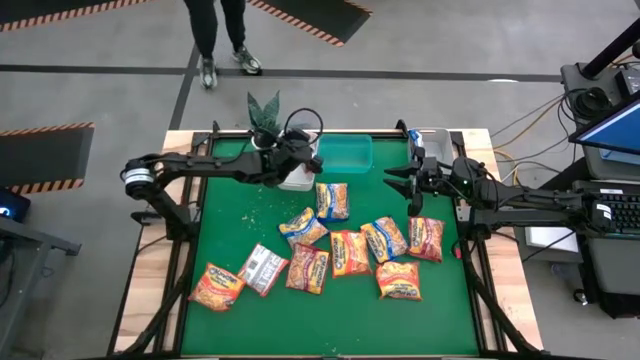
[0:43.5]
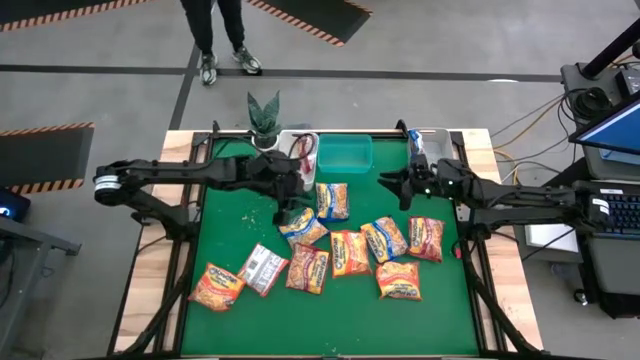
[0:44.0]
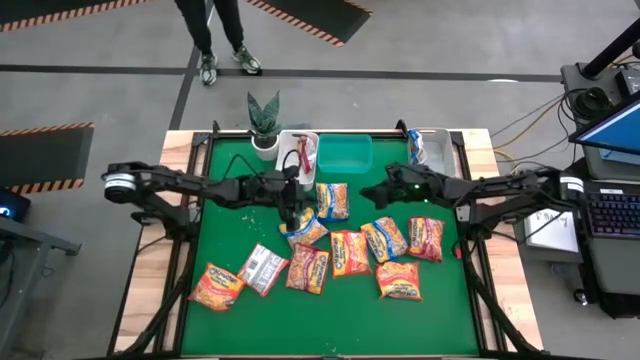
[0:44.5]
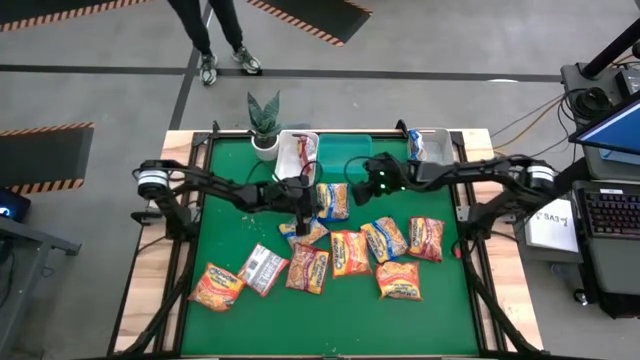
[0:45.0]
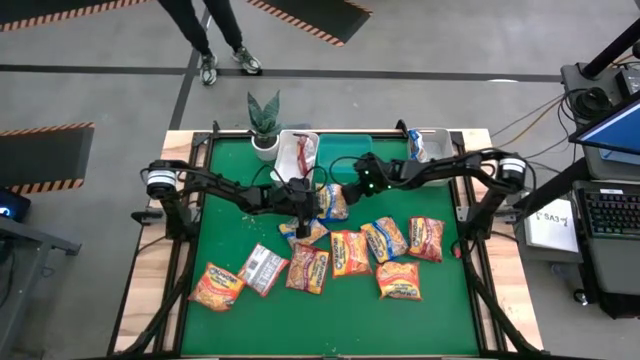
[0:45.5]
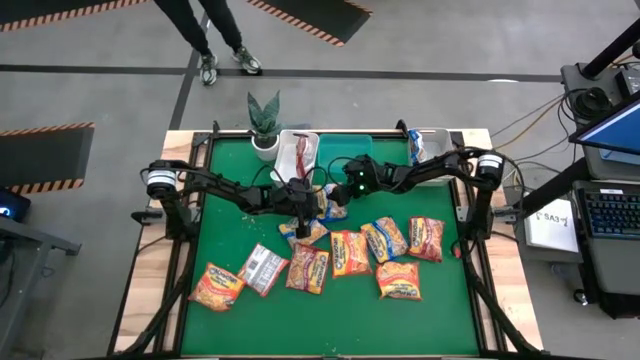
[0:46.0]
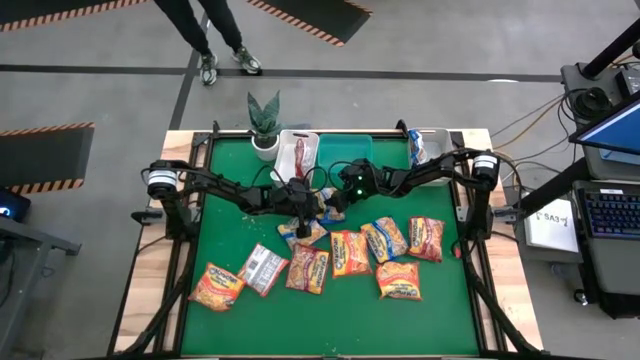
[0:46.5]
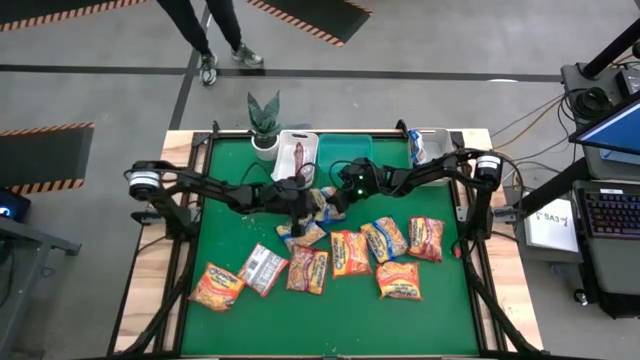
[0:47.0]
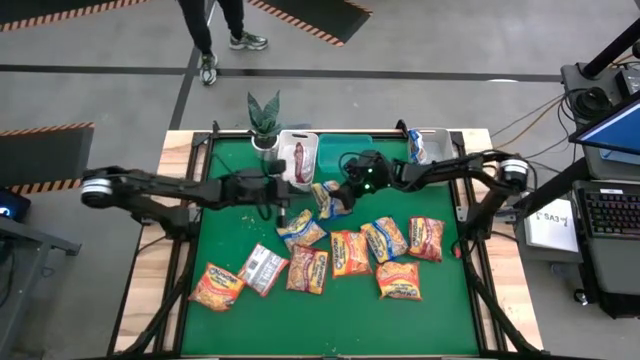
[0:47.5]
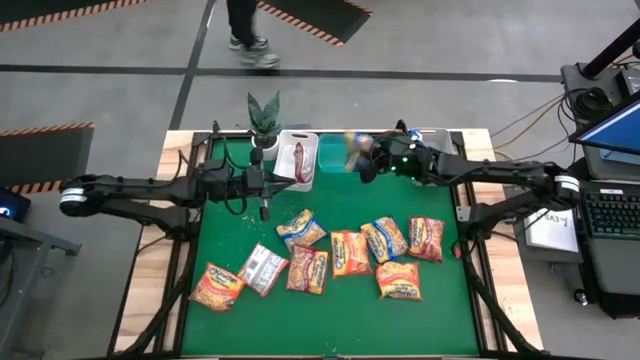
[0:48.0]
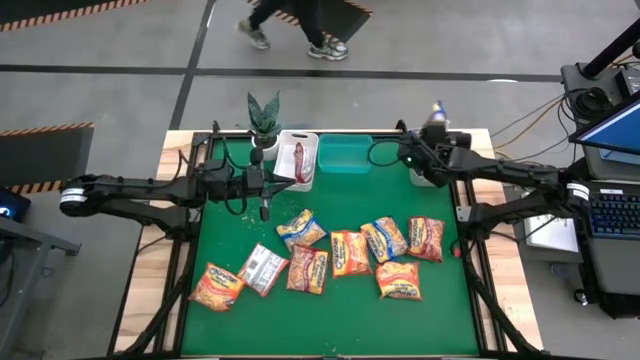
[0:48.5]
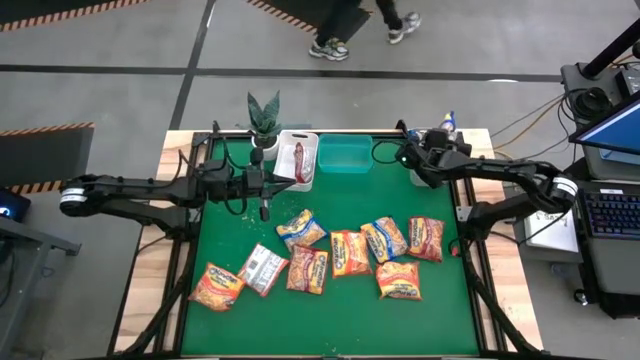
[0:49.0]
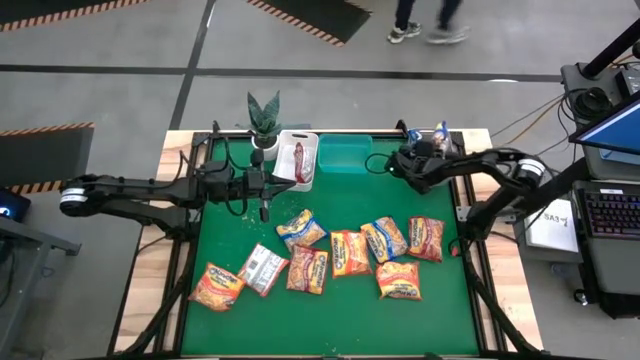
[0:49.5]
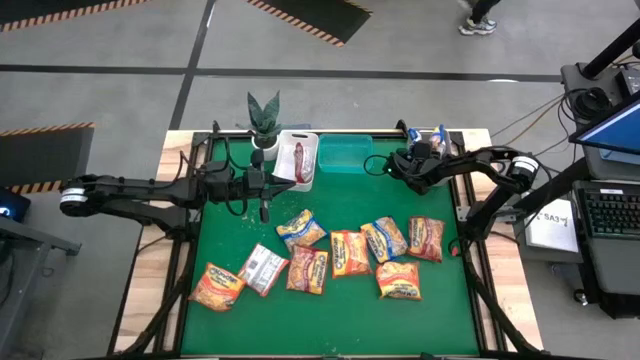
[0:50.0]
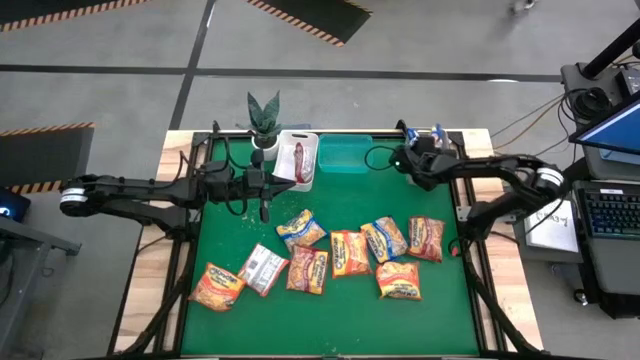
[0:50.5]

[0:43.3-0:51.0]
Task: Sort Maruchan noodles
Put the blue noodle pack into the gray bin

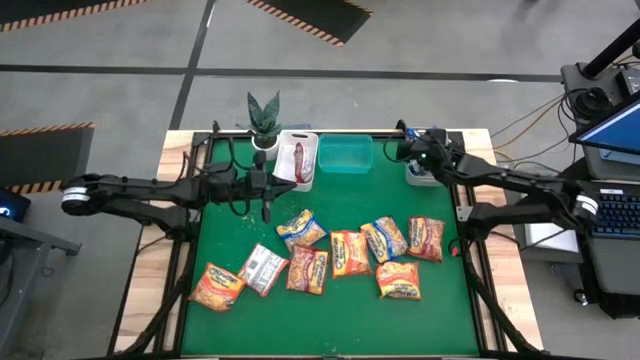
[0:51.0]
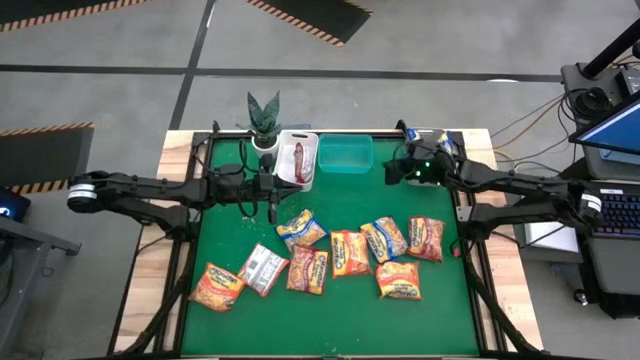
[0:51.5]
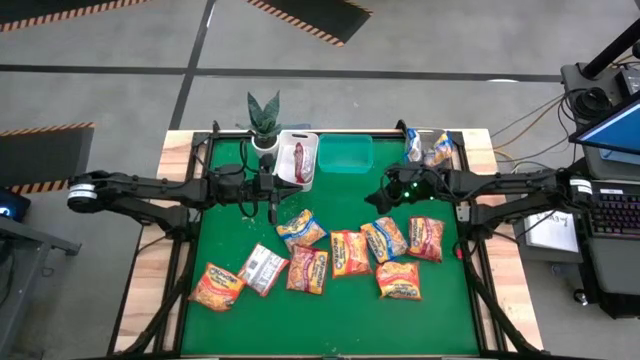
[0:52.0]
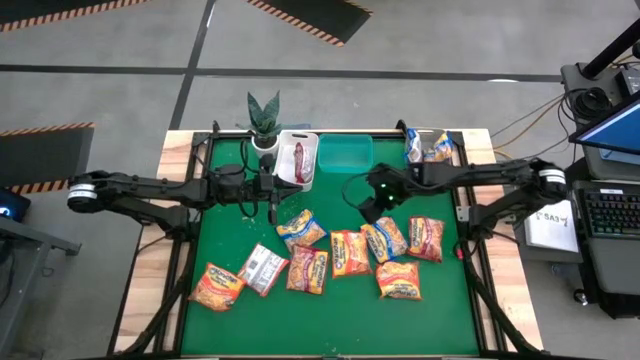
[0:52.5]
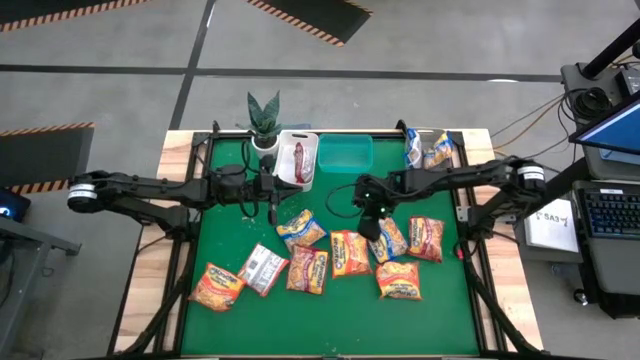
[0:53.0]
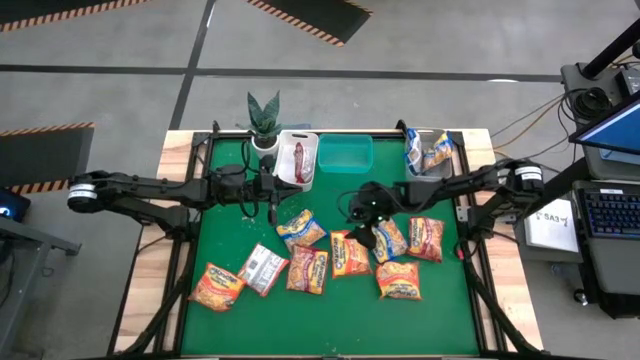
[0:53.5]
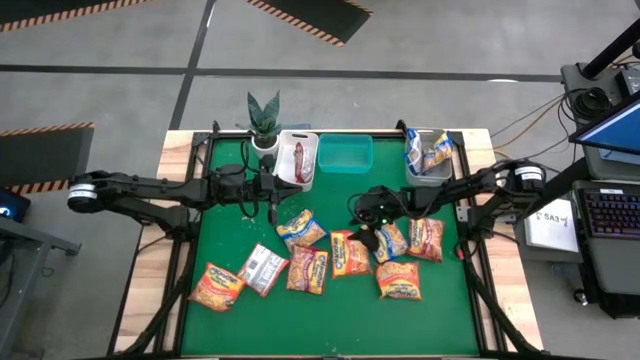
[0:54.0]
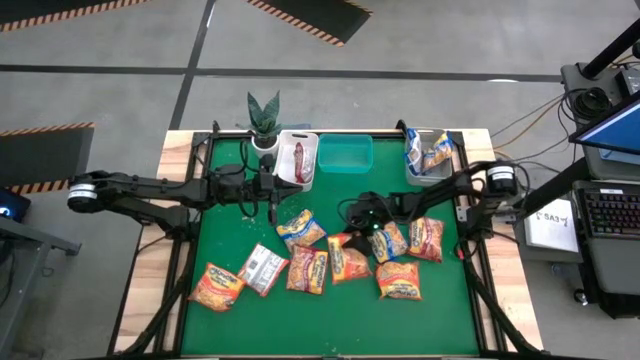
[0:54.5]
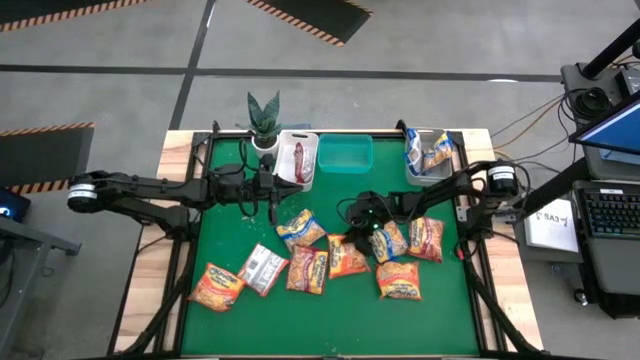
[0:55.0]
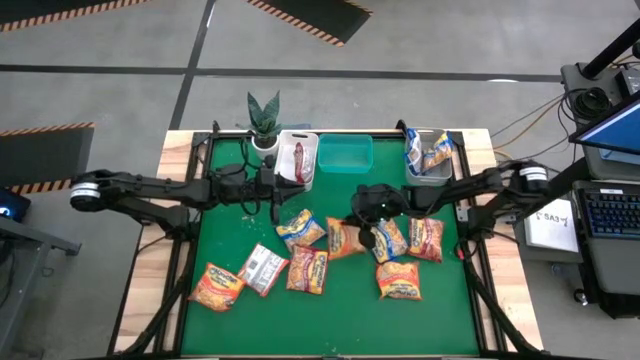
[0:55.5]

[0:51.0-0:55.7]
Put the orange noodle pack into the green bin

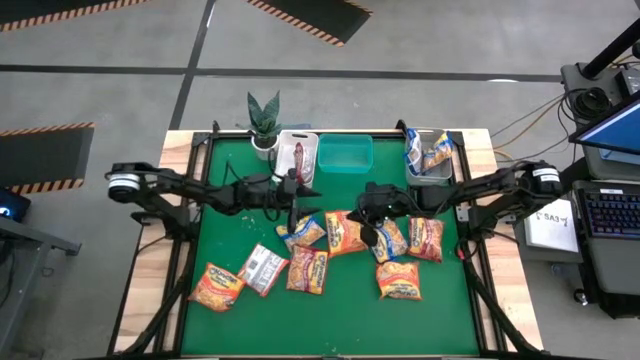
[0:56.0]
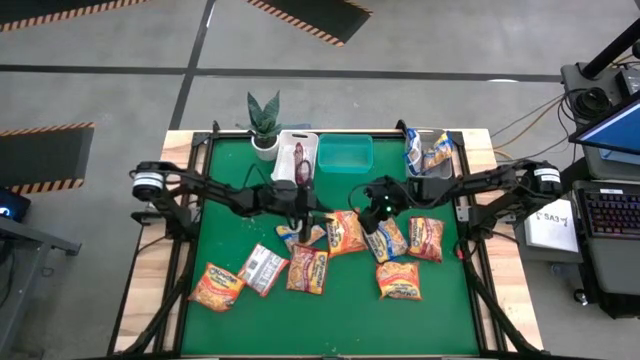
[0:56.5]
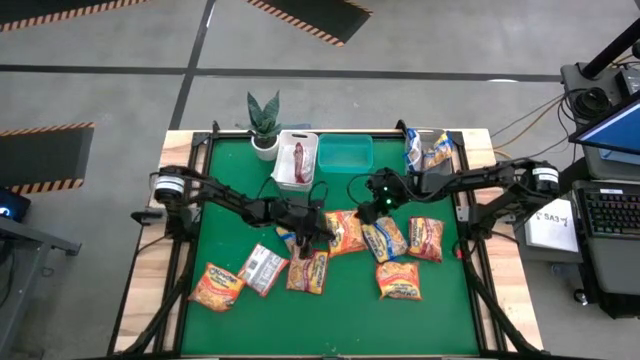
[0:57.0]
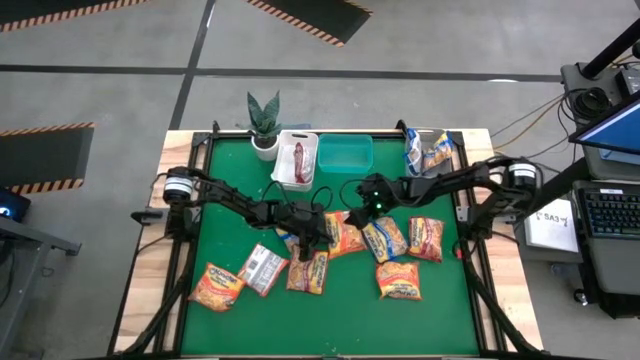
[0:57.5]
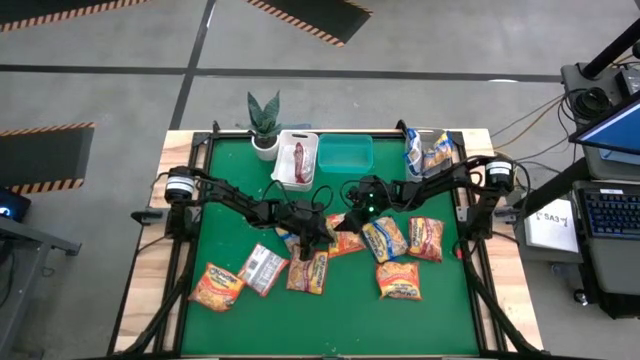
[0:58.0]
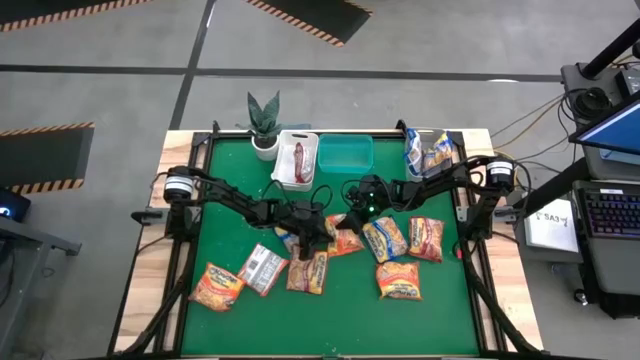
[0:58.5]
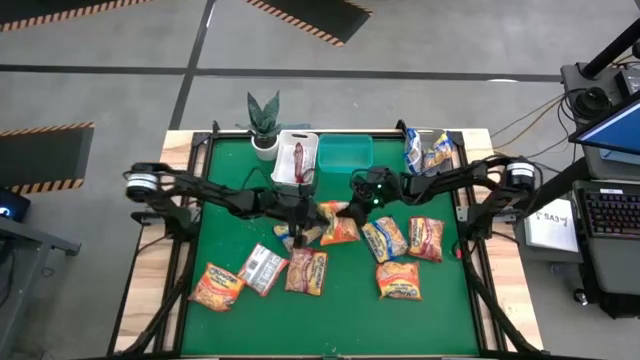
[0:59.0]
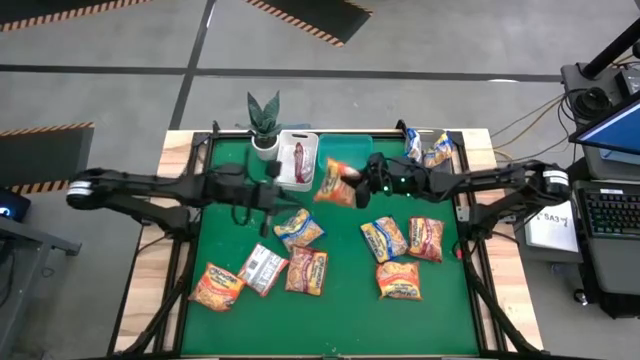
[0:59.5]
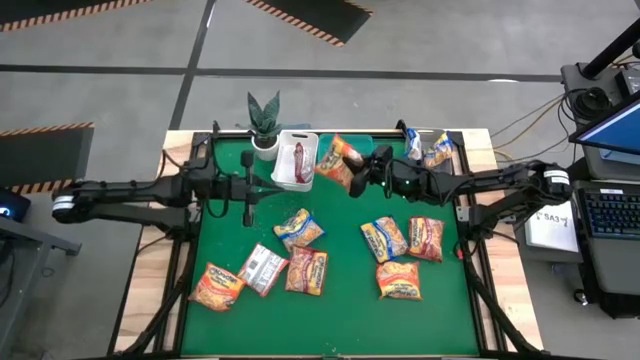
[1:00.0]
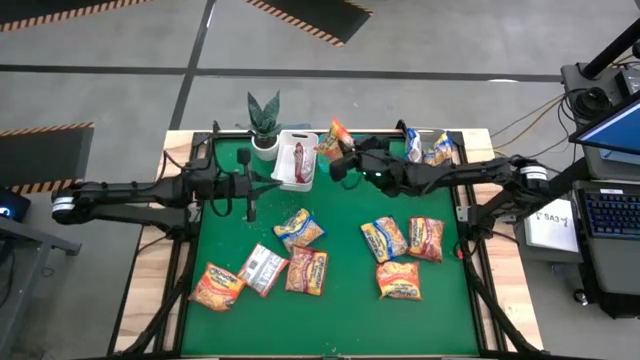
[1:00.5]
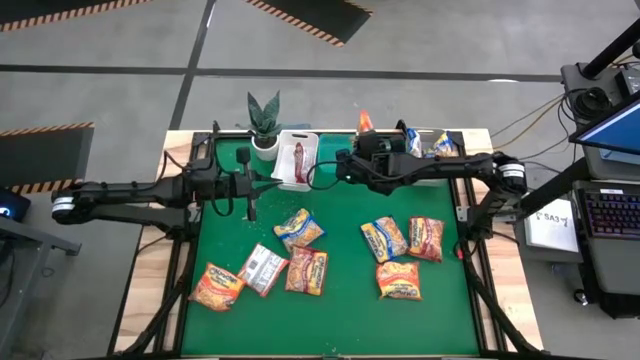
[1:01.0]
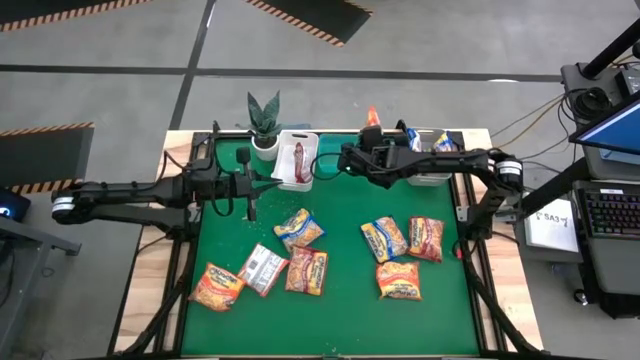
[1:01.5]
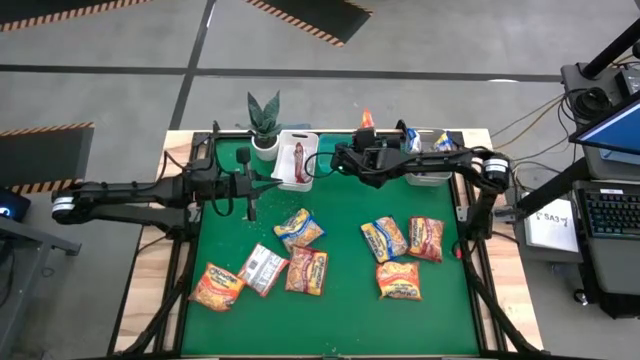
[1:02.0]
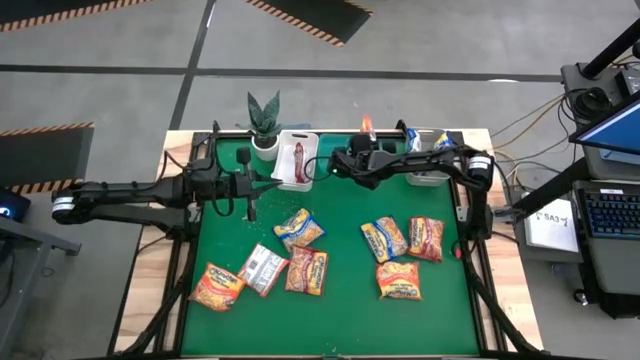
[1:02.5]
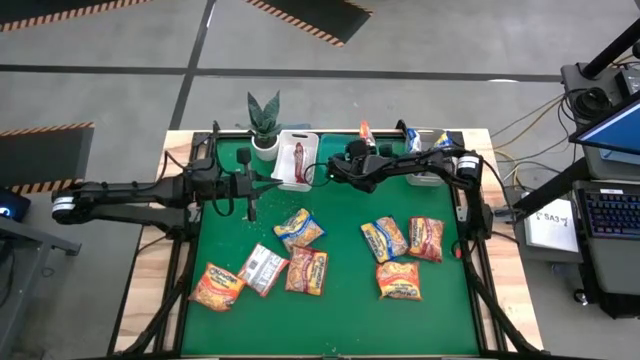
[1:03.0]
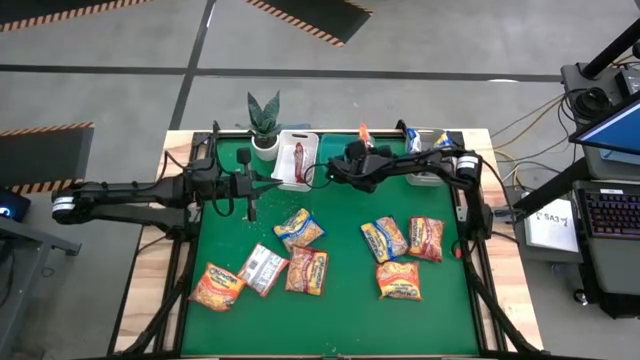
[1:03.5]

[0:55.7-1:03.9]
Put the orange noodle pack into the green bin
